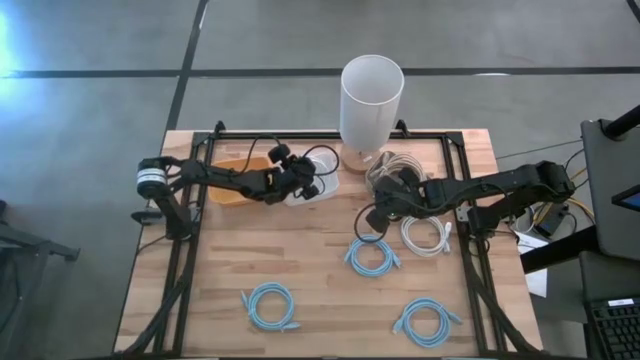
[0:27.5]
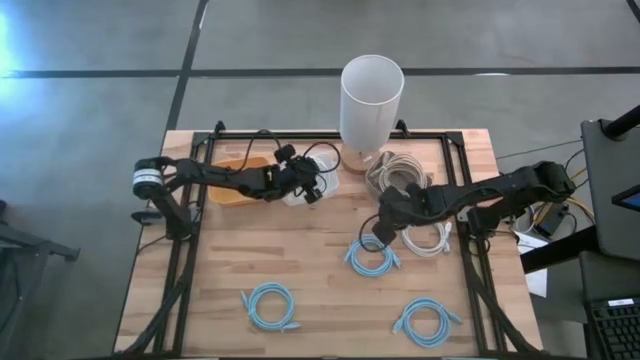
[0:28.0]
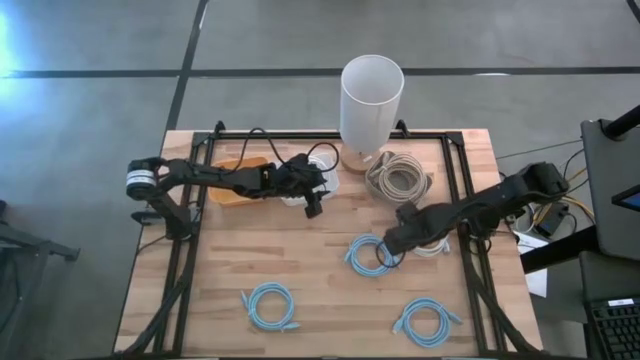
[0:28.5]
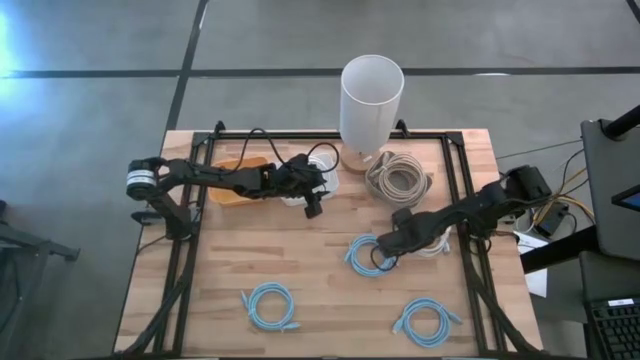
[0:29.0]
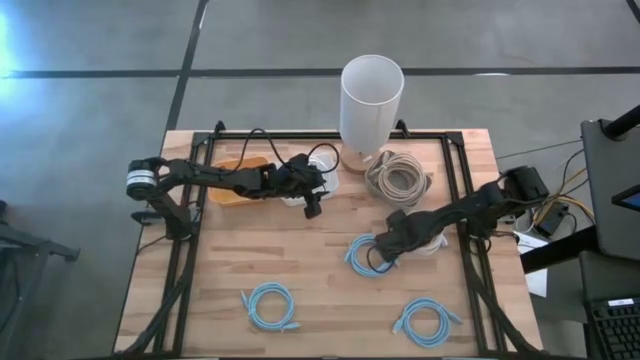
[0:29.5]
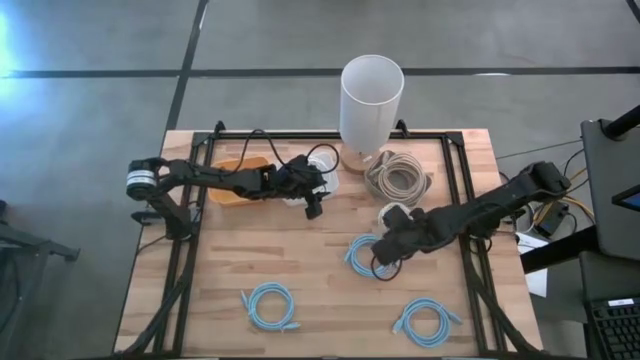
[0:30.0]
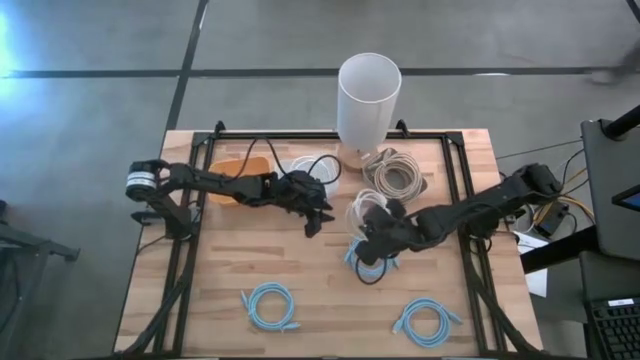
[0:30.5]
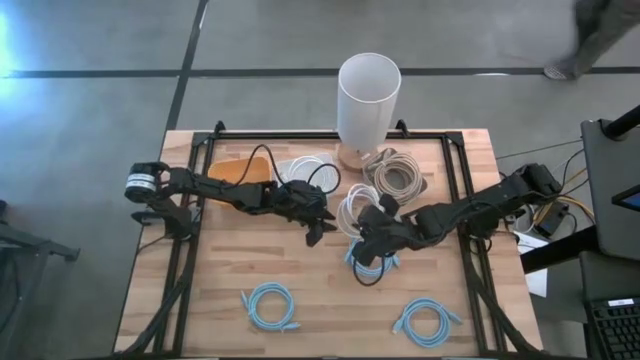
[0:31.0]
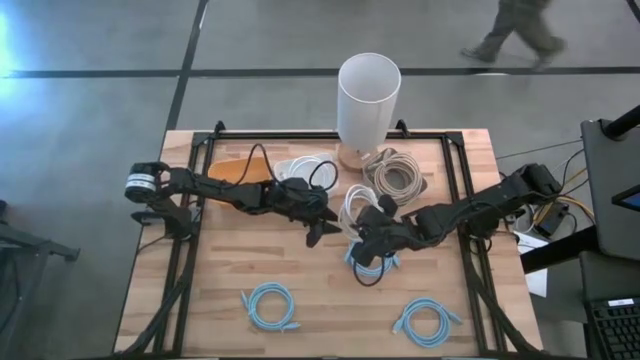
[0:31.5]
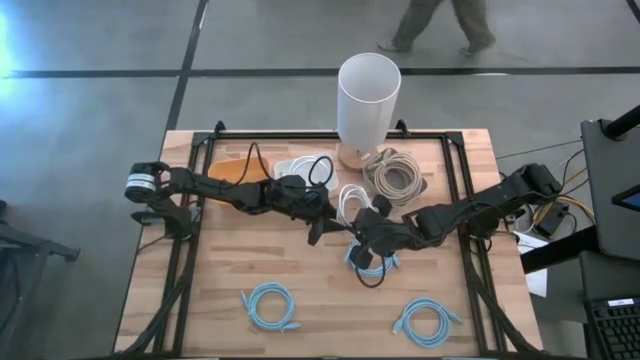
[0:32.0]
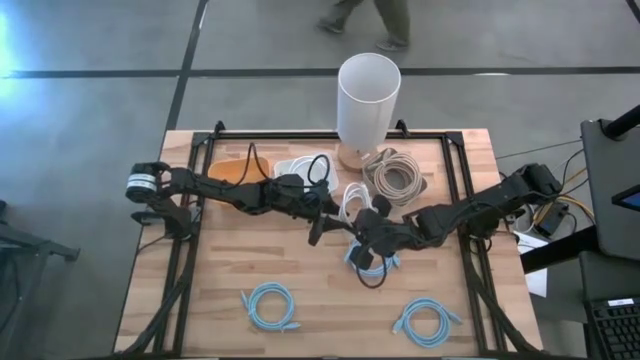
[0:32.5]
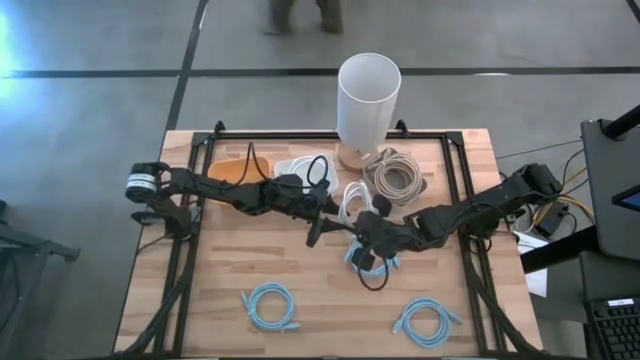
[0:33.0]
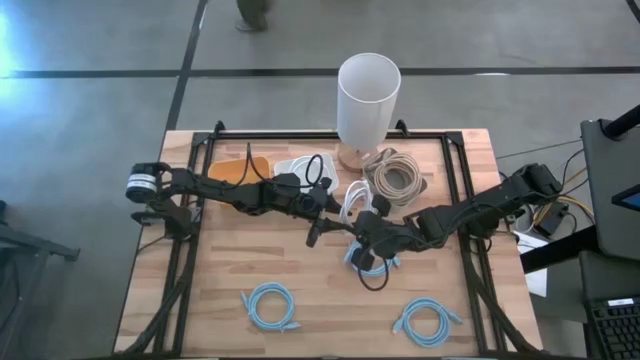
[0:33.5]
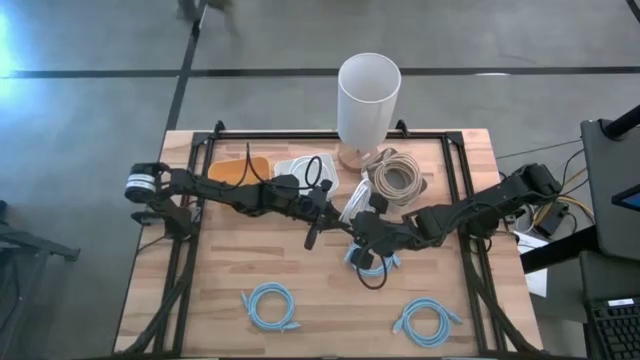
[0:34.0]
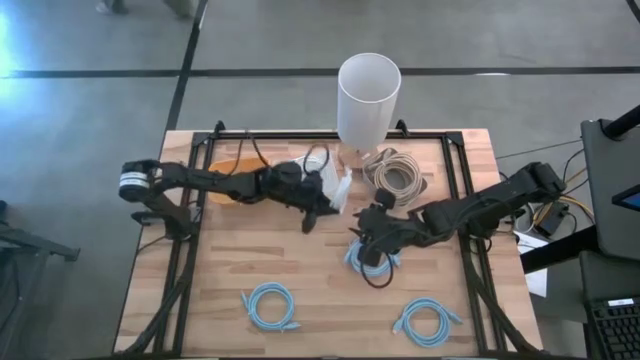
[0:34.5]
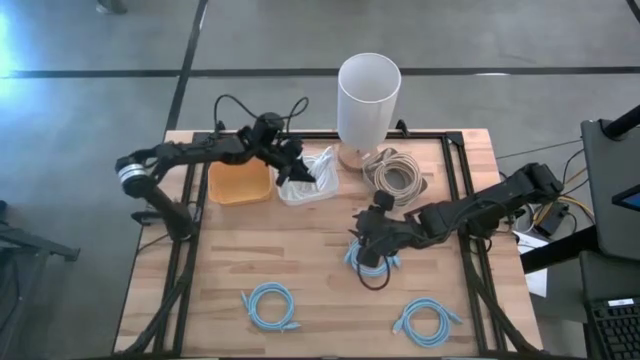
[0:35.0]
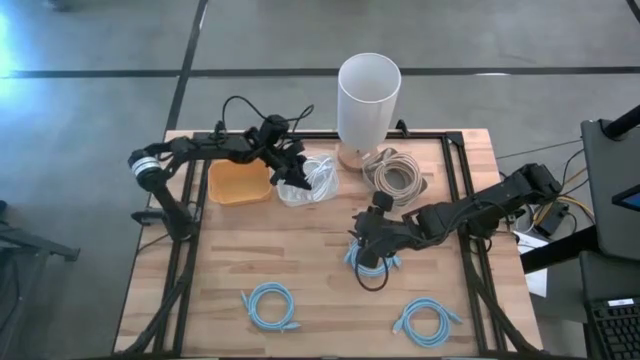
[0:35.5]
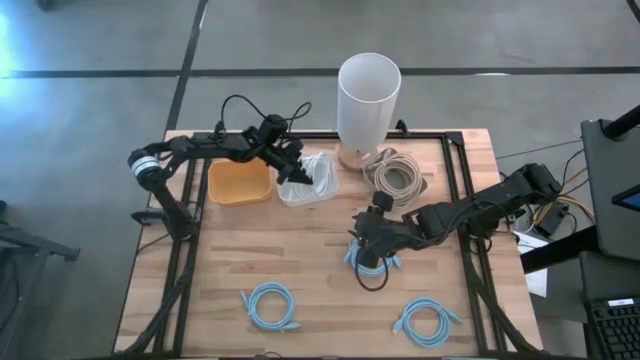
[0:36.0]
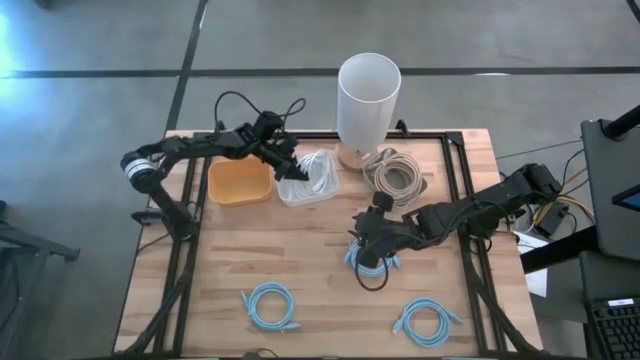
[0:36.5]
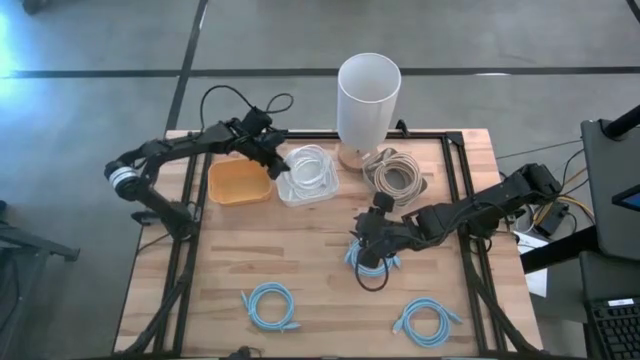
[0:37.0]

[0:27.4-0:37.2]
Task: Pick & Place USB Port
Put the white USB cable into the white bin

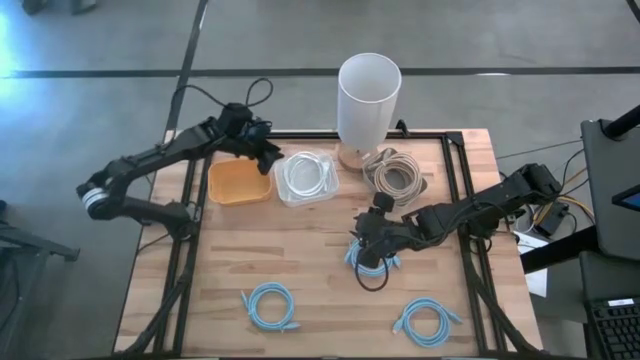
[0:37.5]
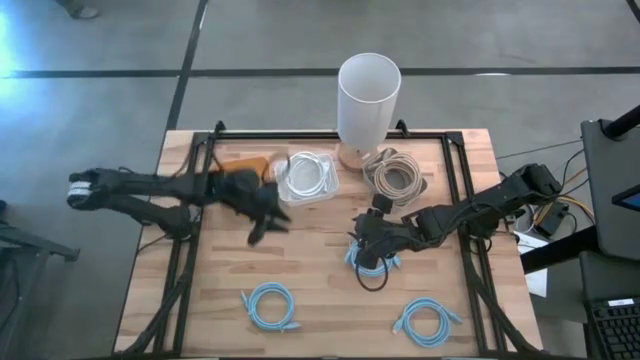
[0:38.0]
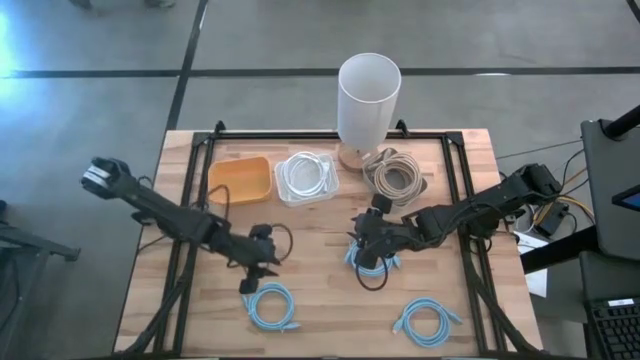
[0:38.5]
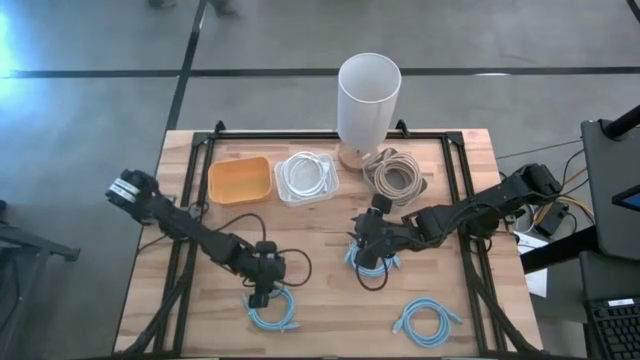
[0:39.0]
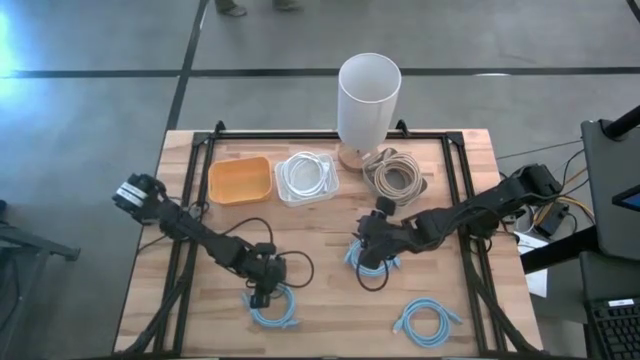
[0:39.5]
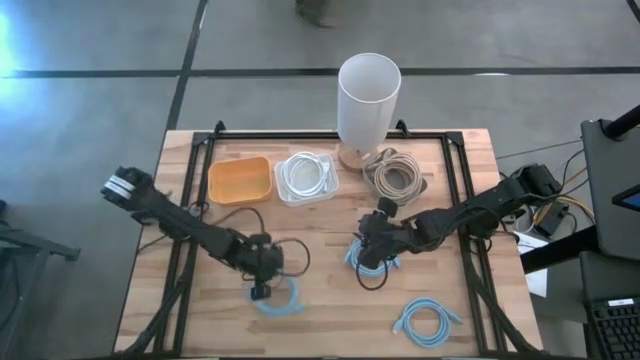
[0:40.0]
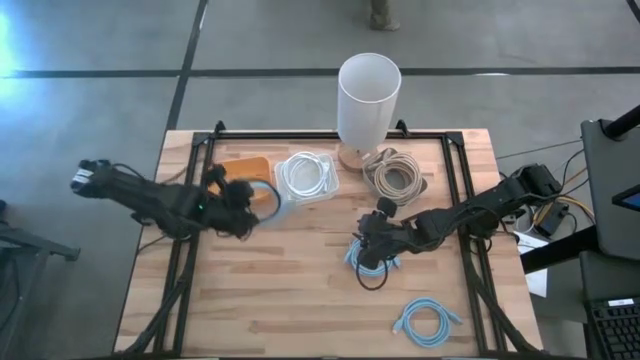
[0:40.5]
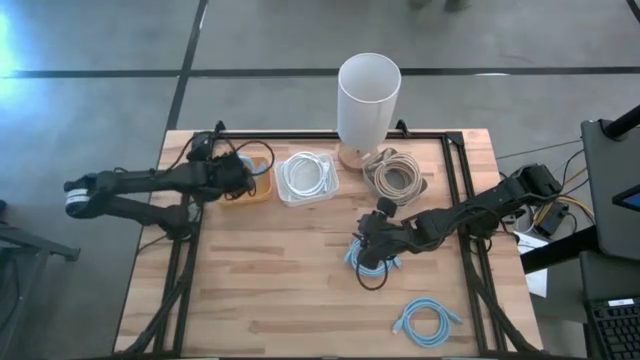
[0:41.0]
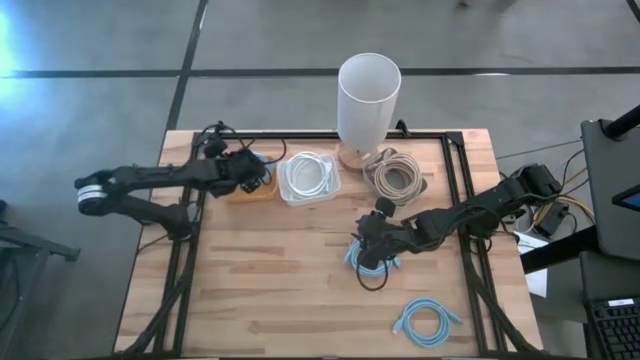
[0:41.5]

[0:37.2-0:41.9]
Put the left blue USB cable into the yellow bin

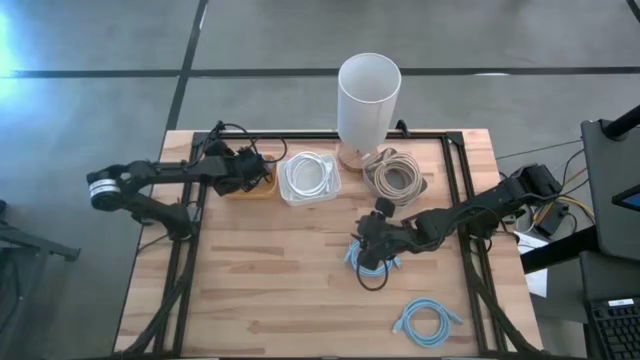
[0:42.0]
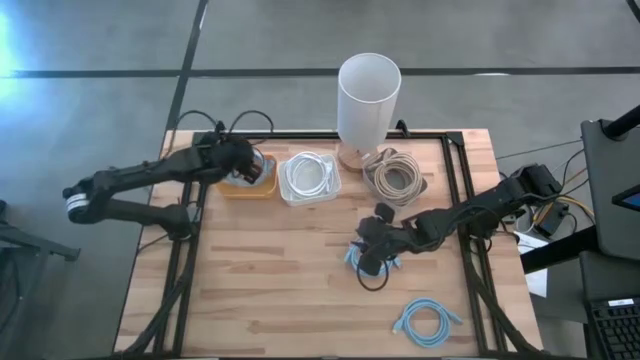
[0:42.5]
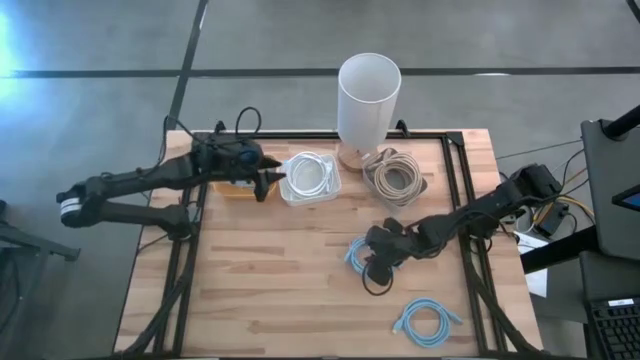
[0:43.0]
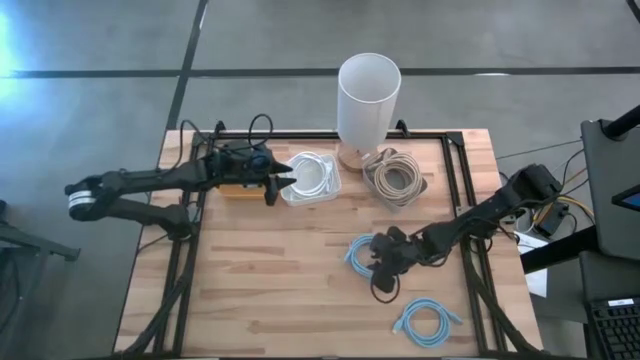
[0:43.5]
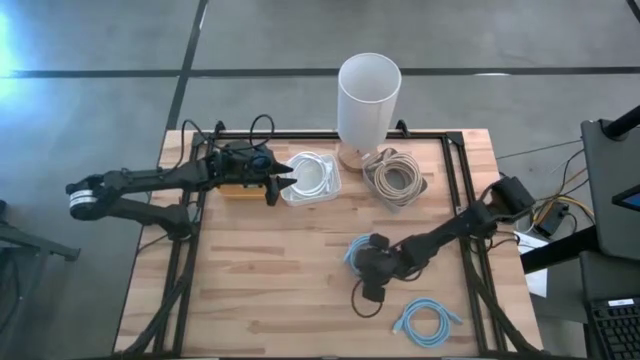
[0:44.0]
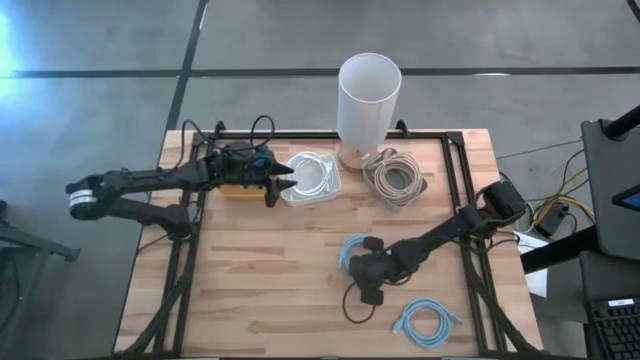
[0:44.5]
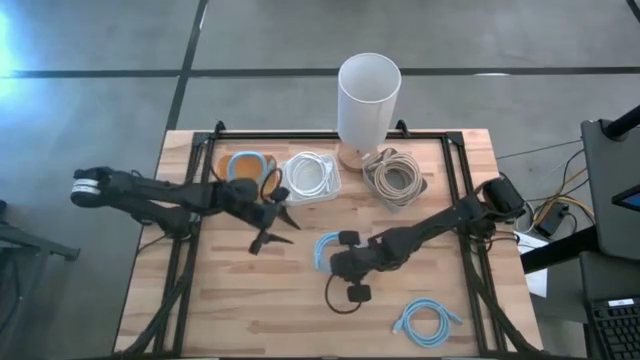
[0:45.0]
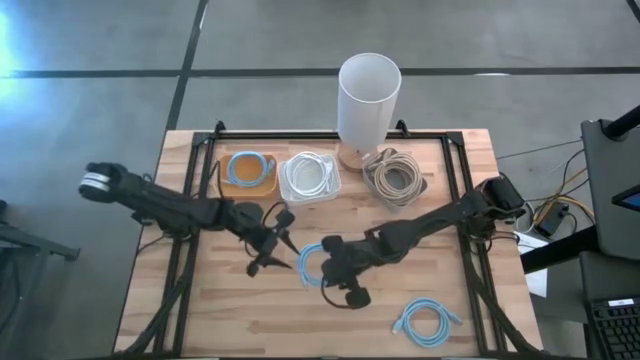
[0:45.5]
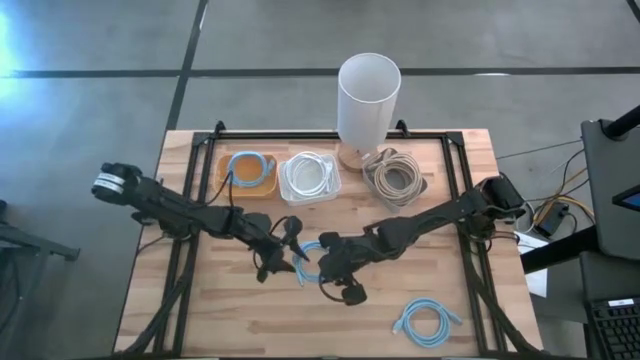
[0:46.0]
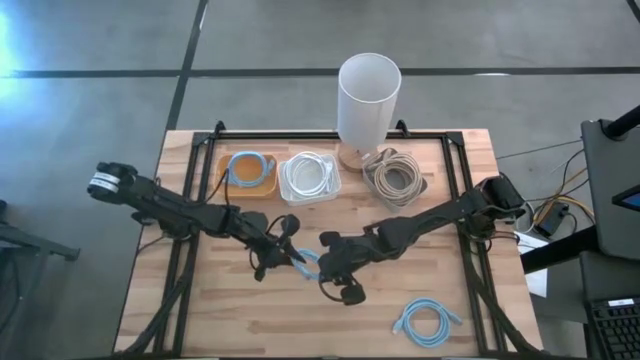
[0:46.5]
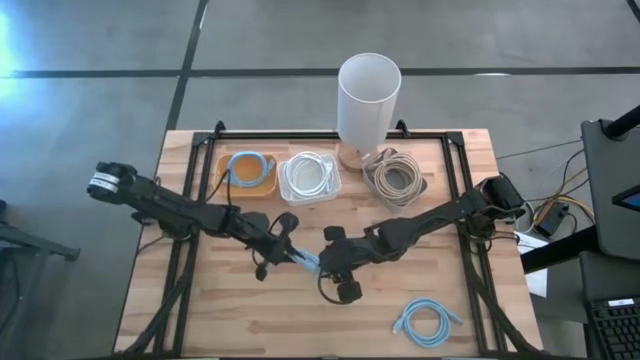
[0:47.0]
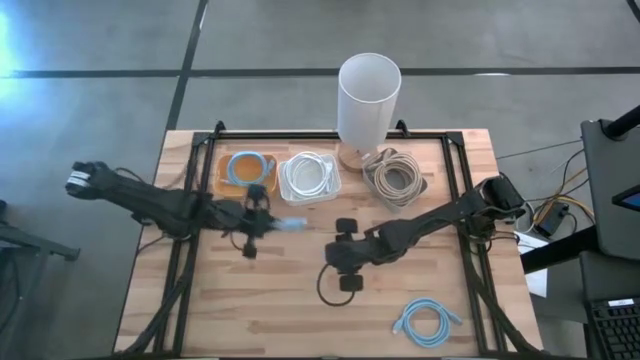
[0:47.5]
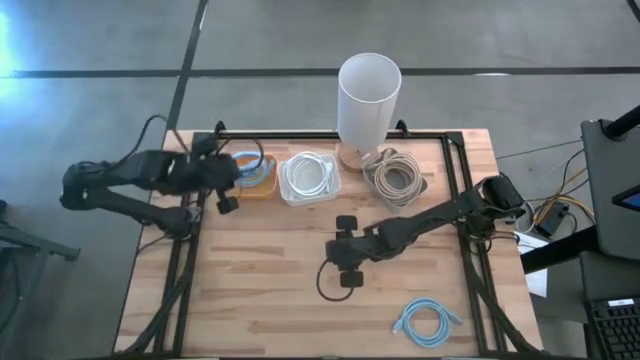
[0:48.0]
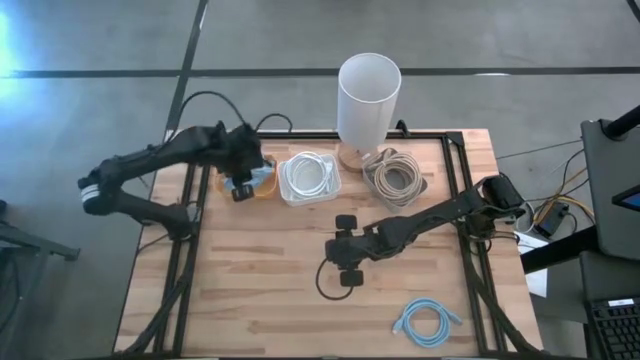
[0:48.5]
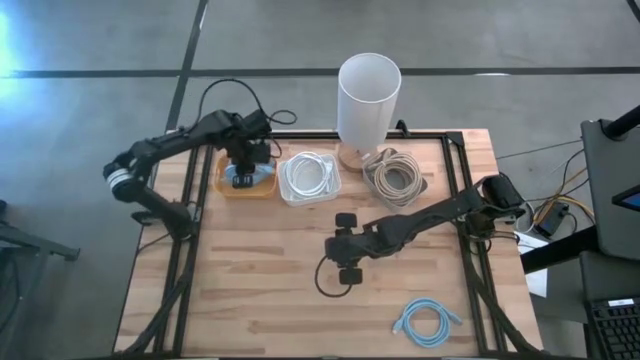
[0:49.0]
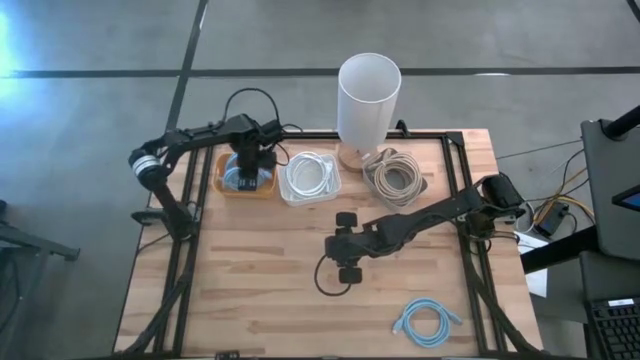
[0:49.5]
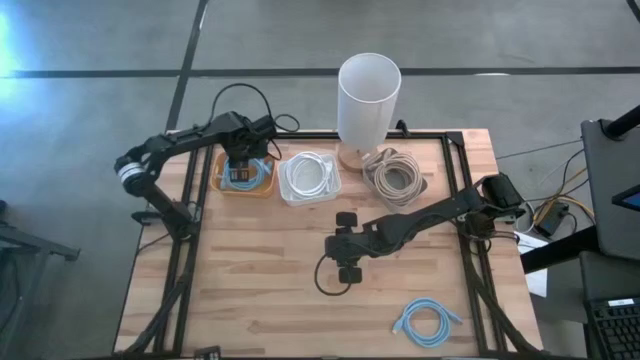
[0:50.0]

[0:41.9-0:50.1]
Put the top blue USB cable into the yellow bin
